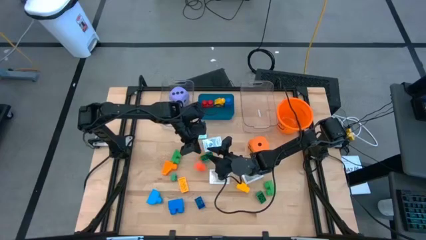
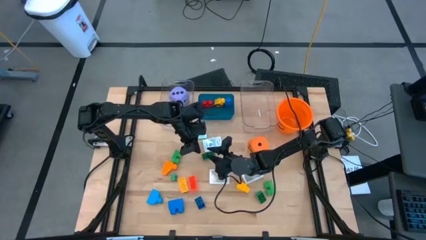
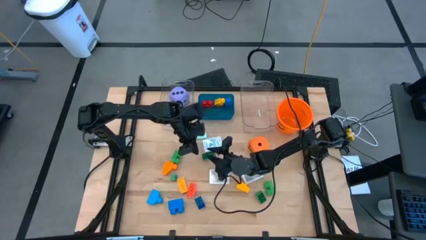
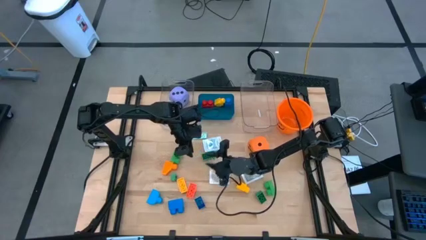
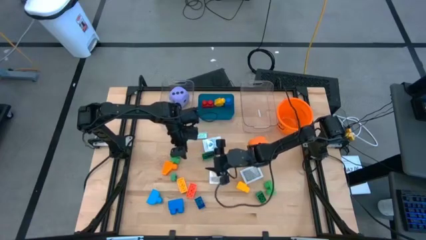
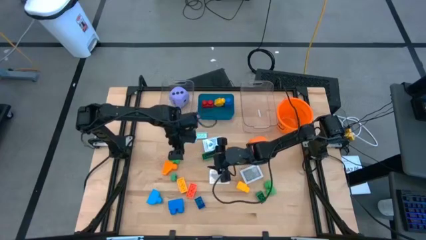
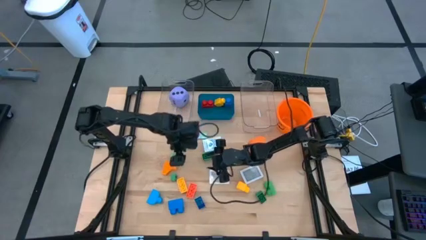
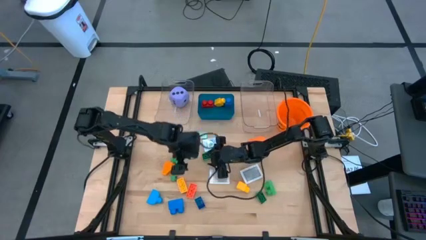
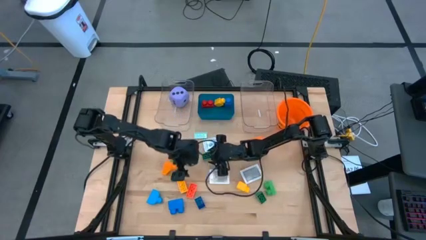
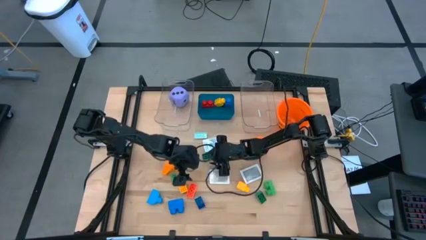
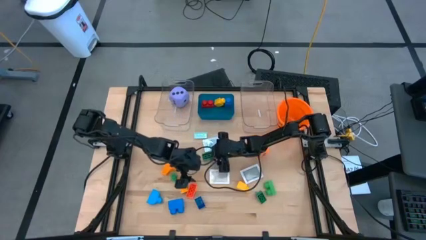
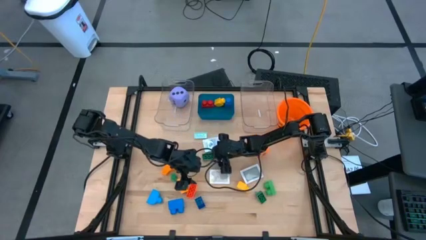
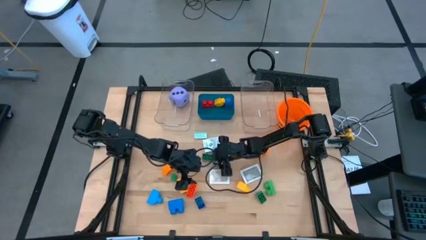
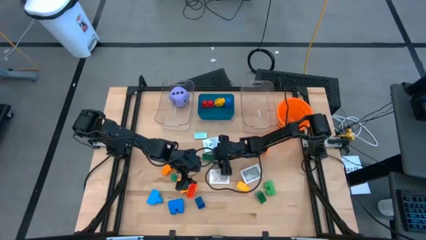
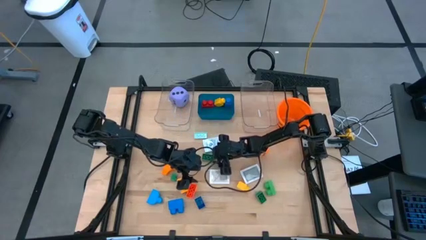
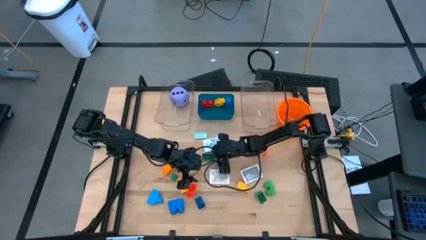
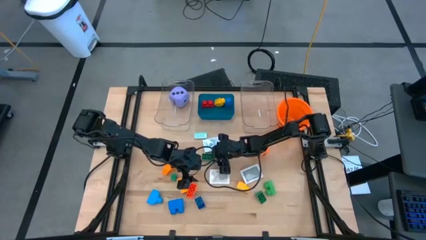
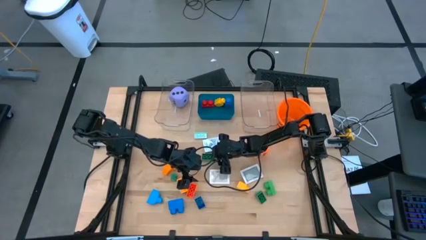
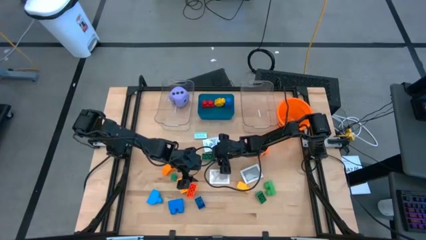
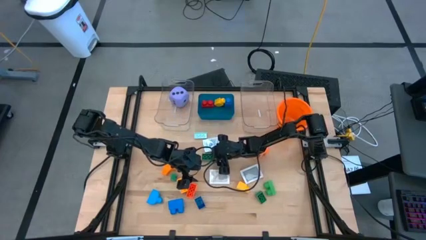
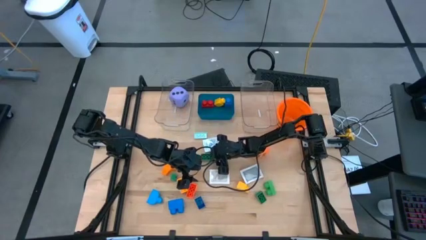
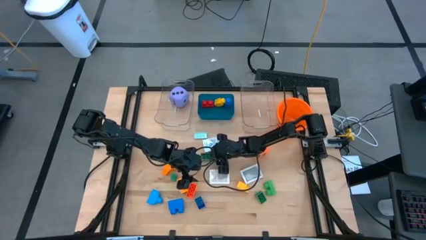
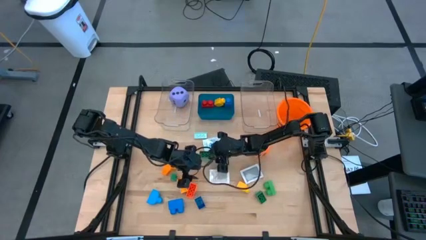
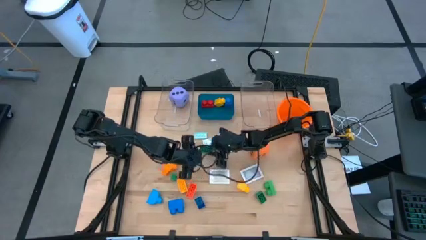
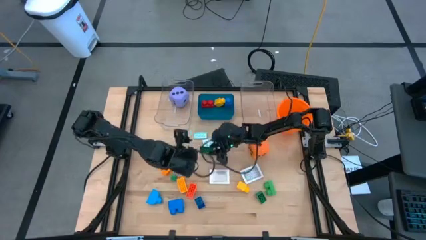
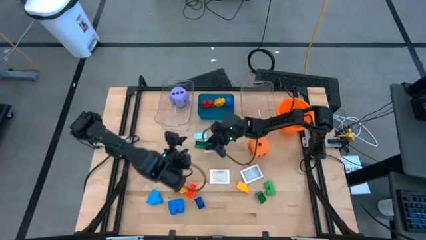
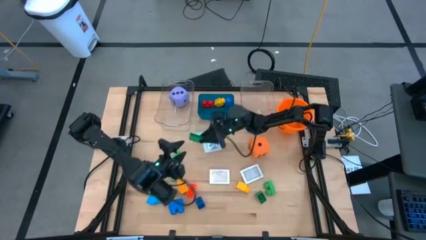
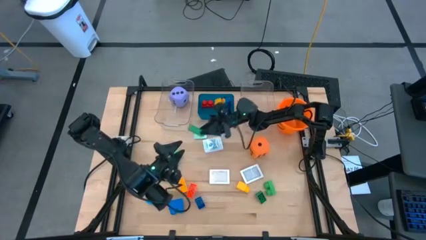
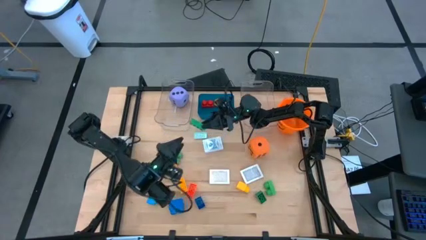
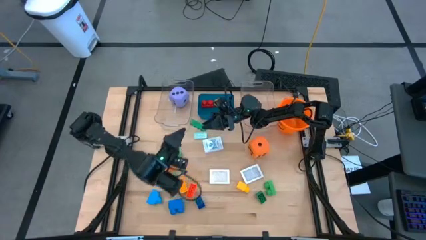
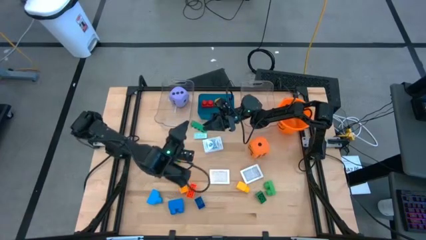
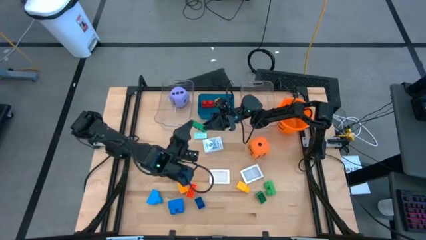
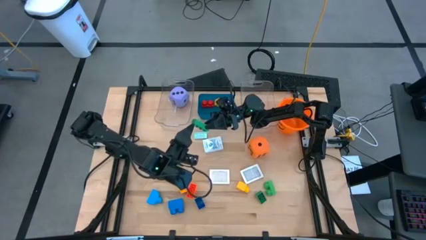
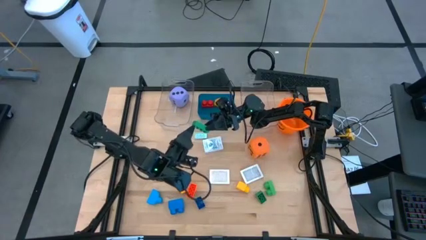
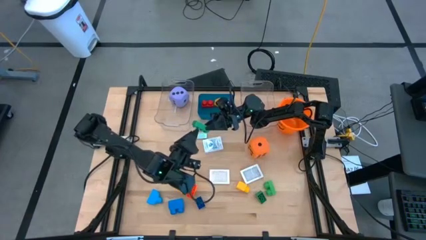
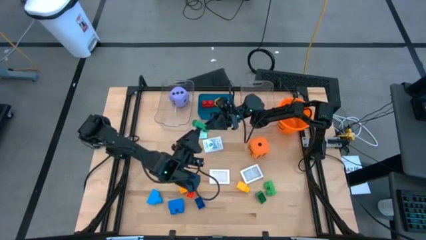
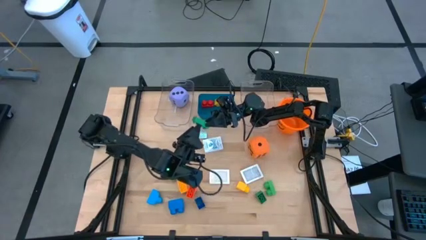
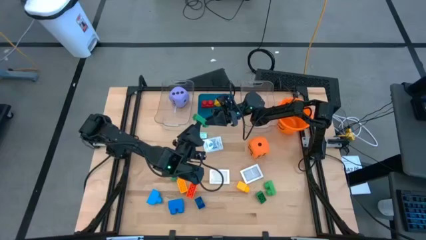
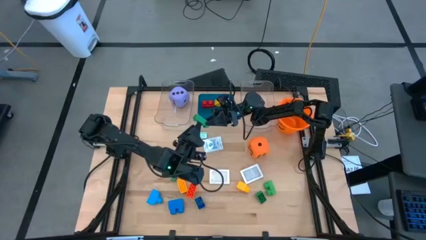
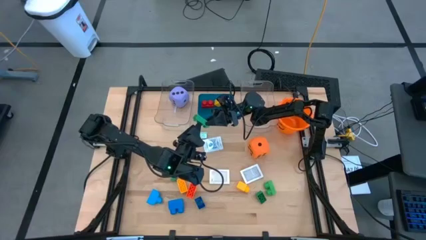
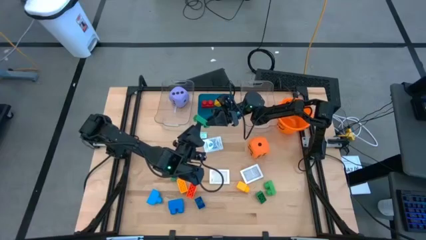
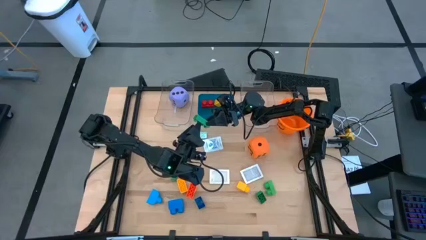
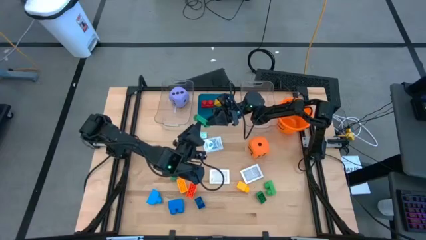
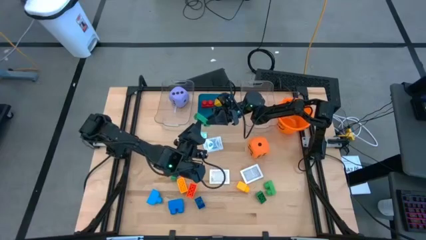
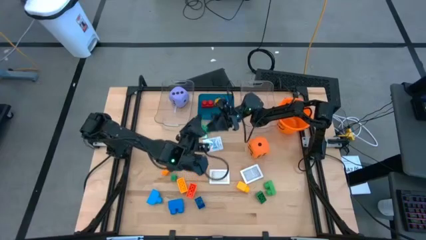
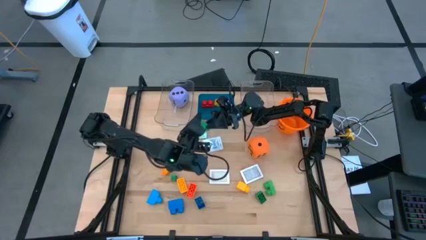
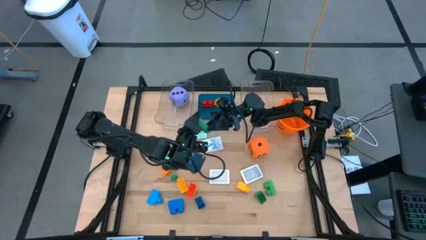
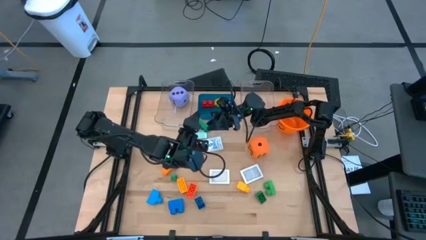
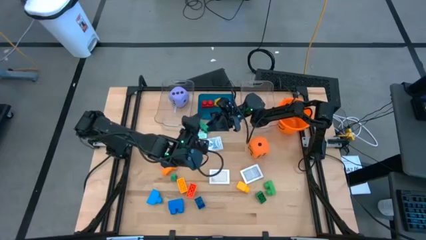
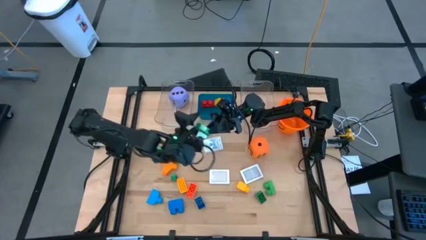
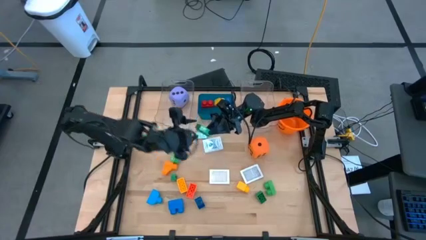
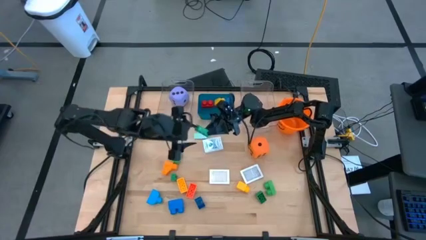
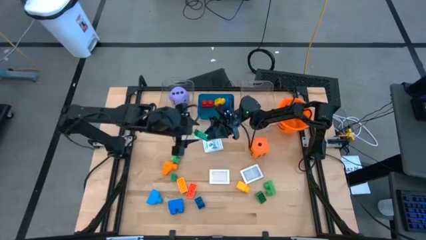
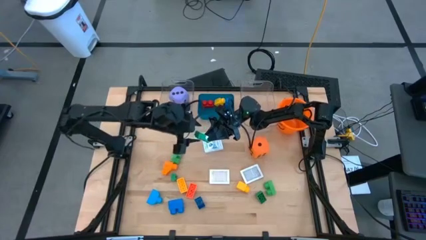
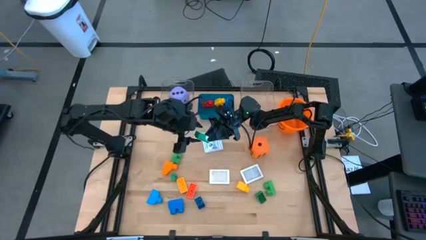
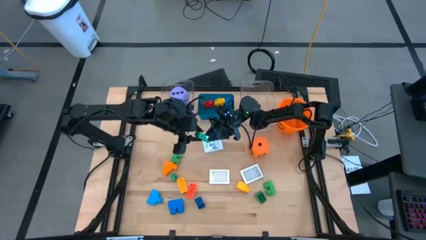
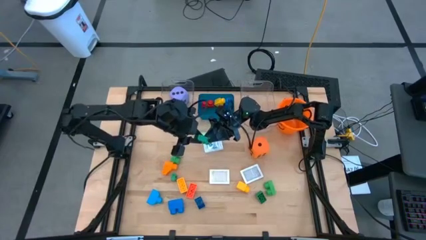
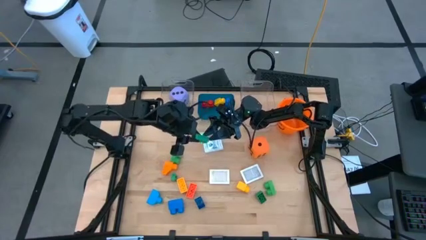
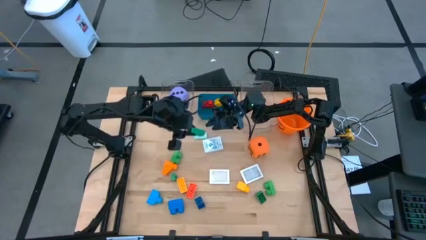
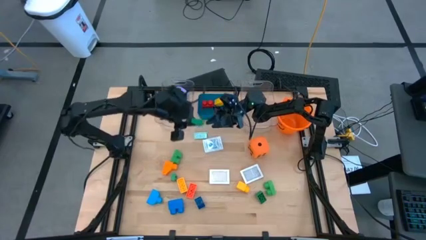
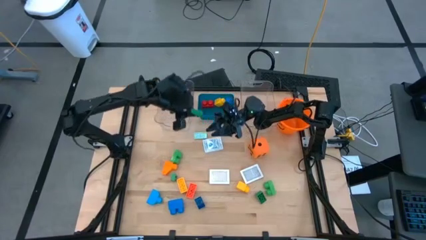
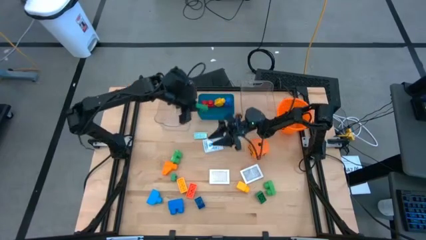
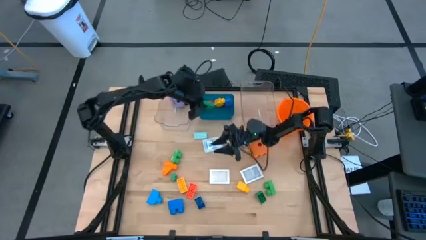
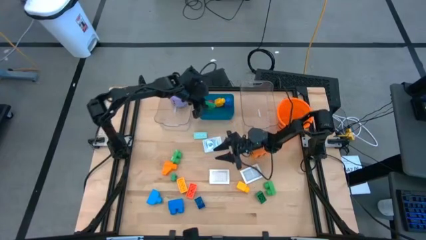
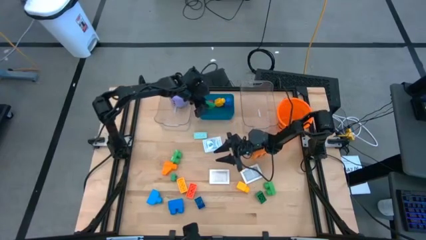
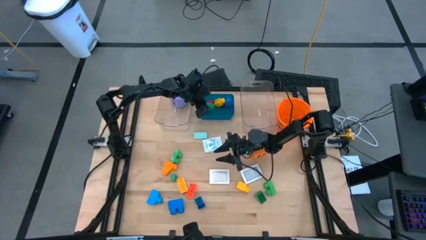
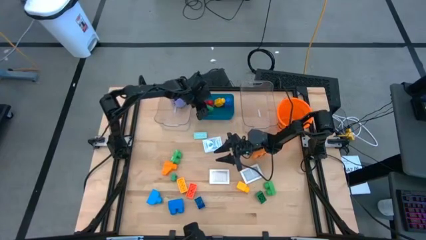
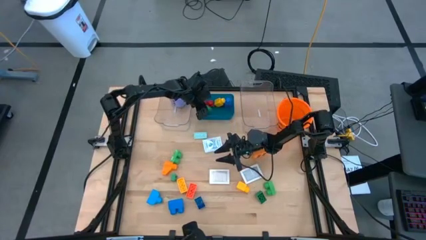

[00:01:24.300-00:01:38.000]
Task: Pick & Place Toys
Put the green game piece into the blue bin

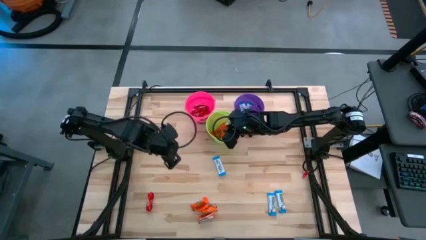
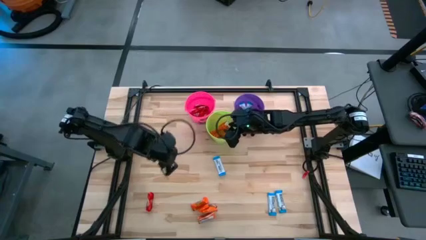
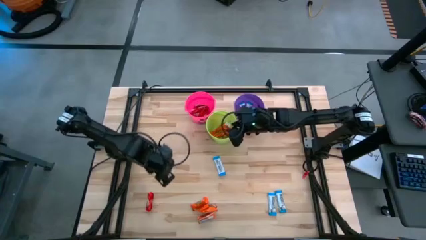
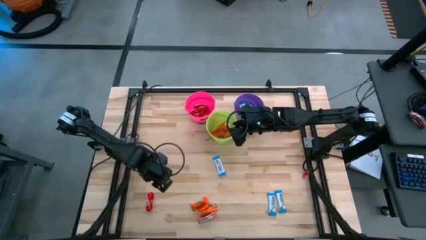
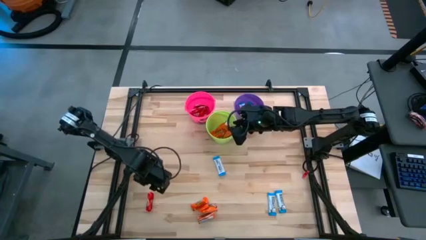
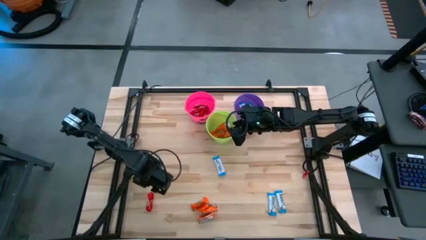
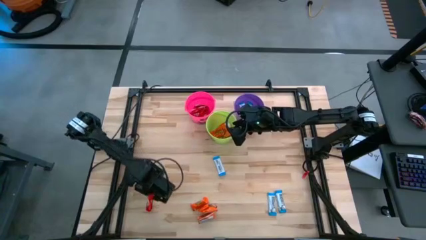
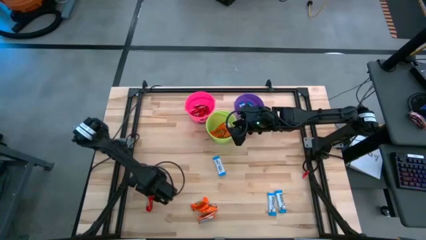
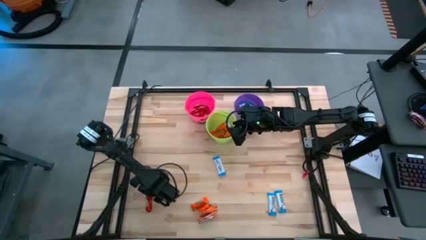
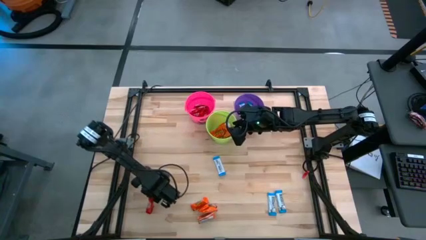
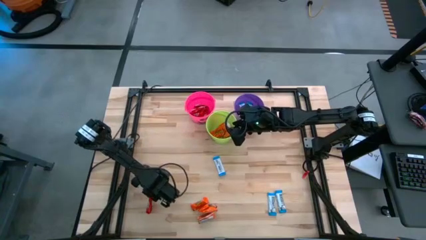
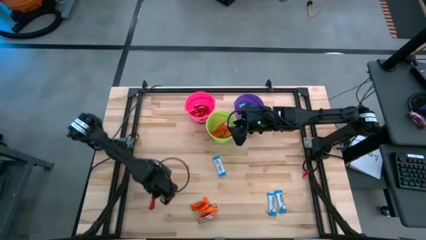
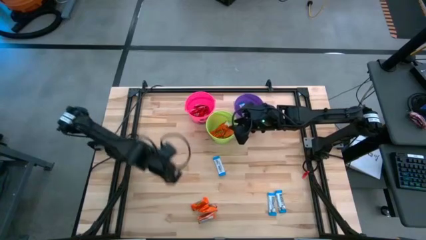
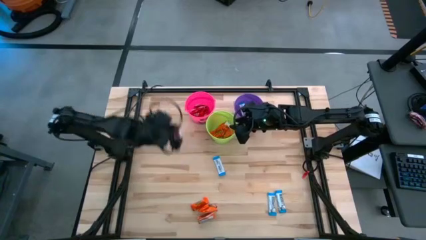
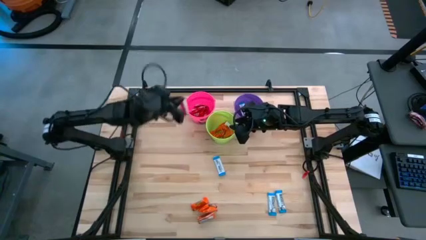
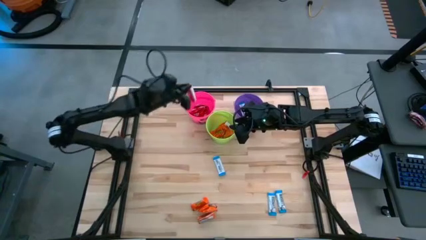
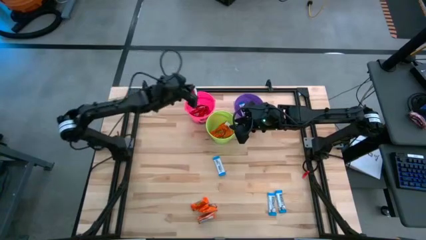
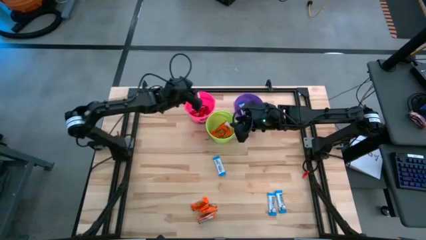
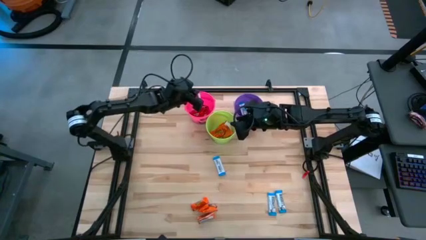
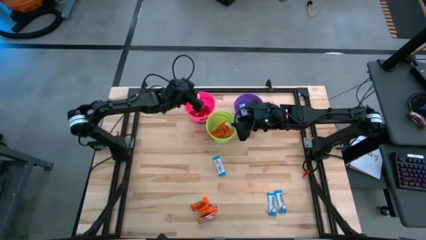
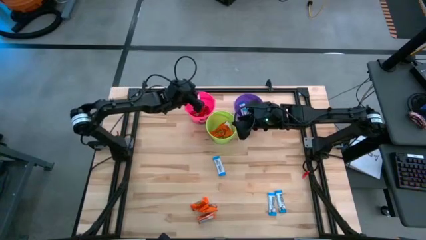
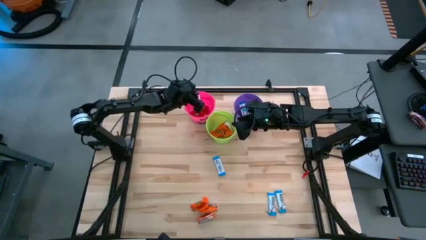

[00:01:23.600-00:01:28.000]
Task: Sort candy
Put the red candy into the pink bin
